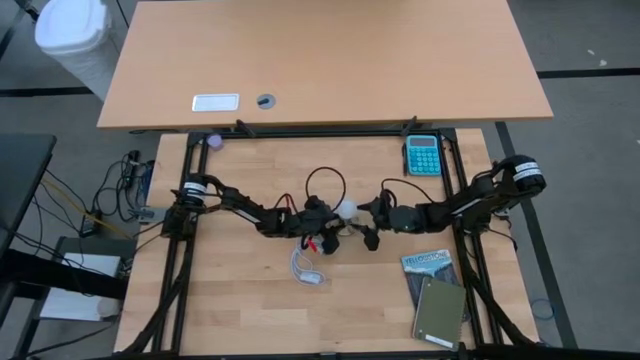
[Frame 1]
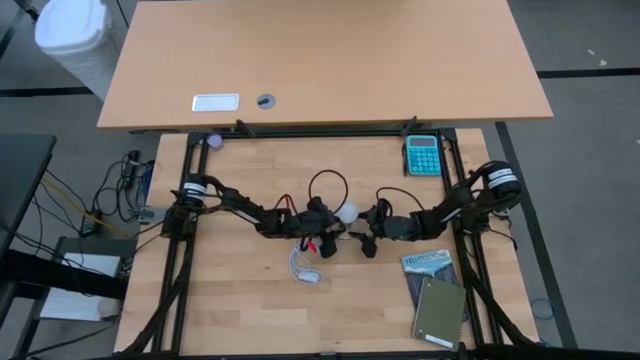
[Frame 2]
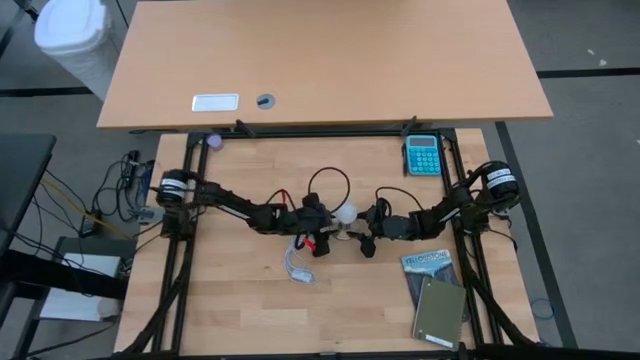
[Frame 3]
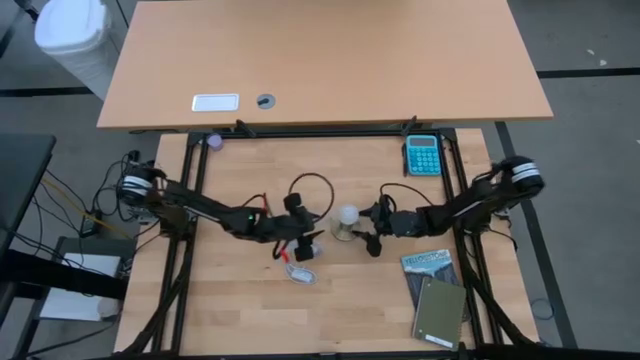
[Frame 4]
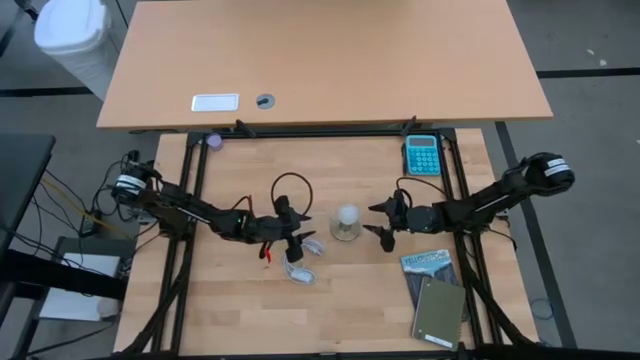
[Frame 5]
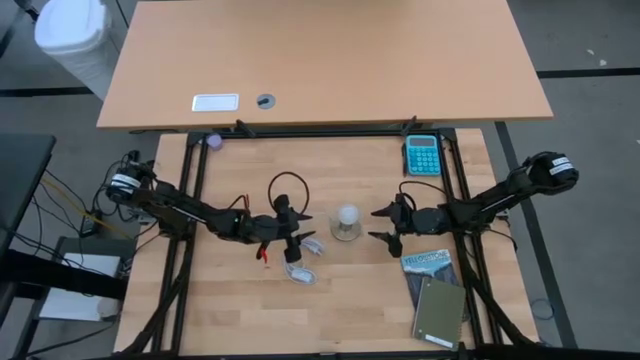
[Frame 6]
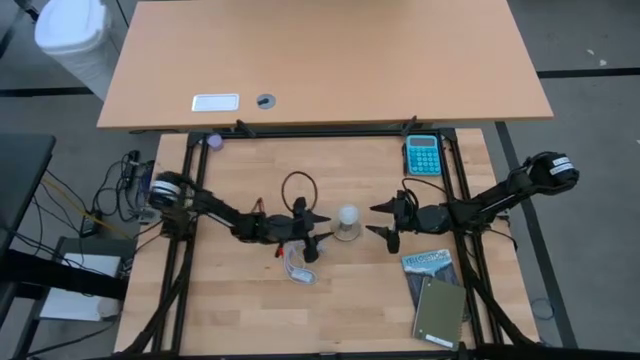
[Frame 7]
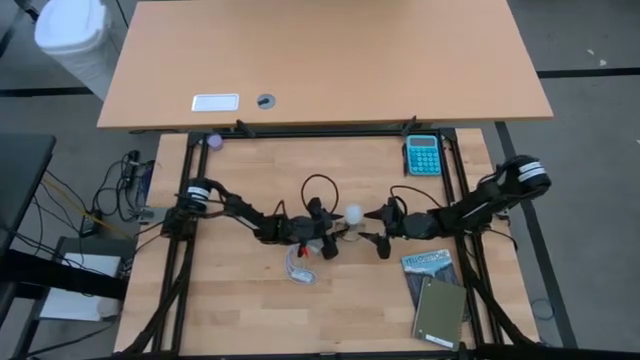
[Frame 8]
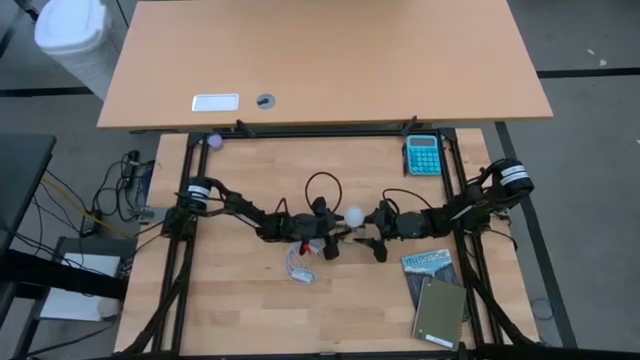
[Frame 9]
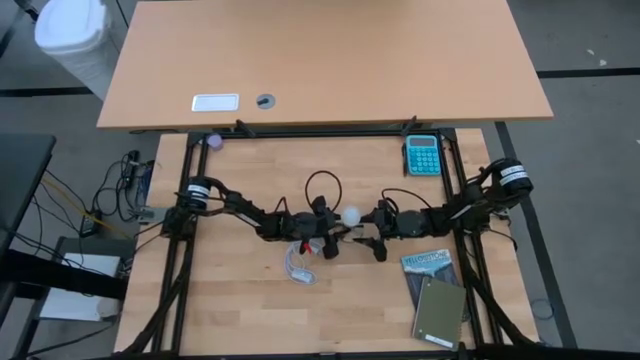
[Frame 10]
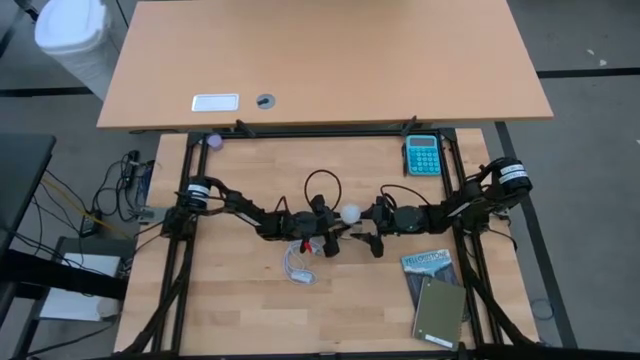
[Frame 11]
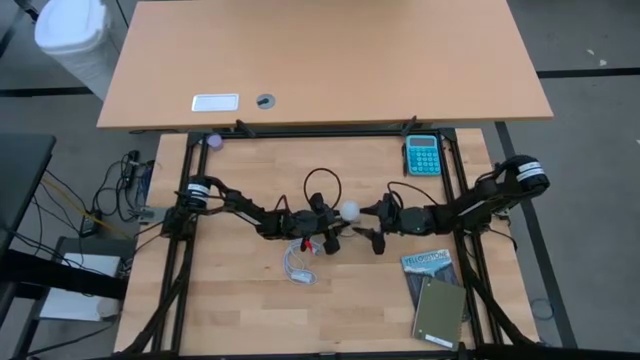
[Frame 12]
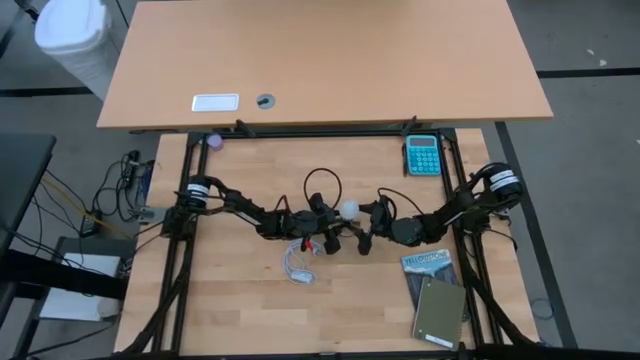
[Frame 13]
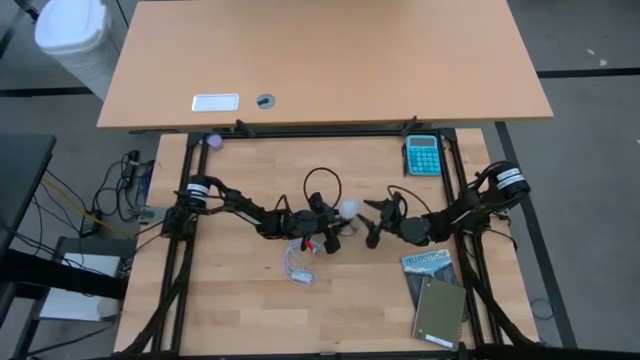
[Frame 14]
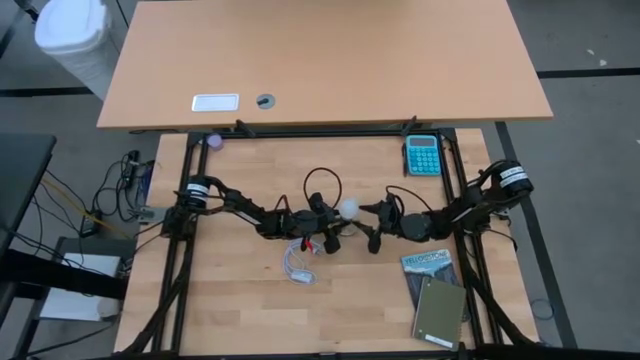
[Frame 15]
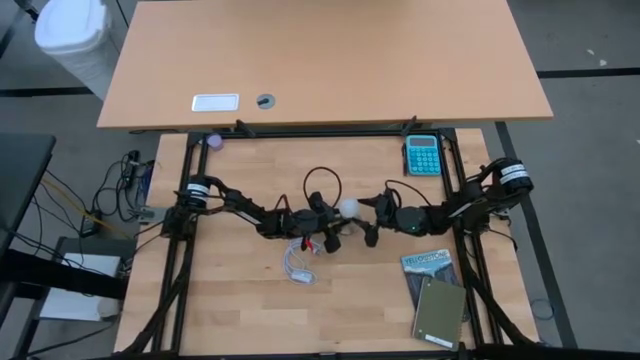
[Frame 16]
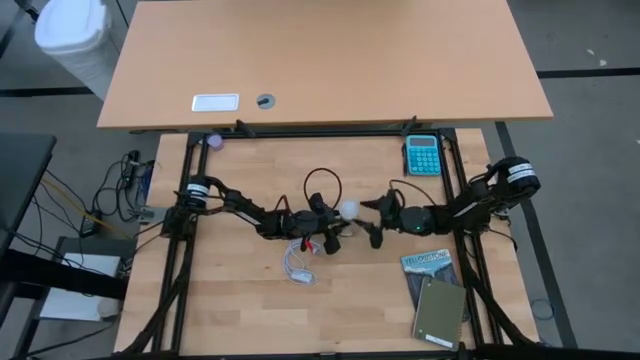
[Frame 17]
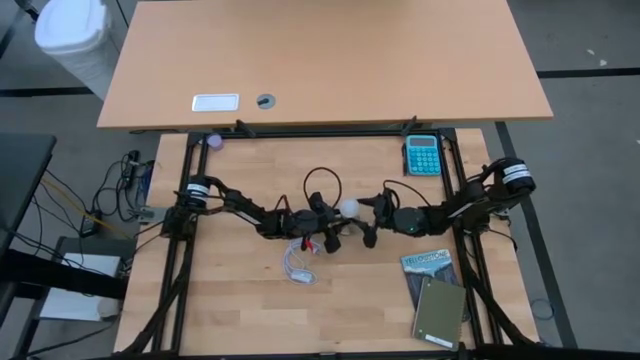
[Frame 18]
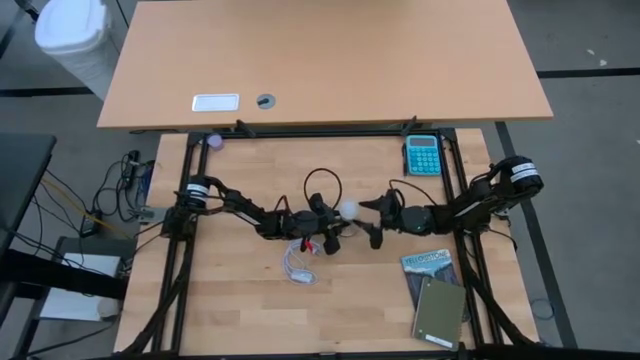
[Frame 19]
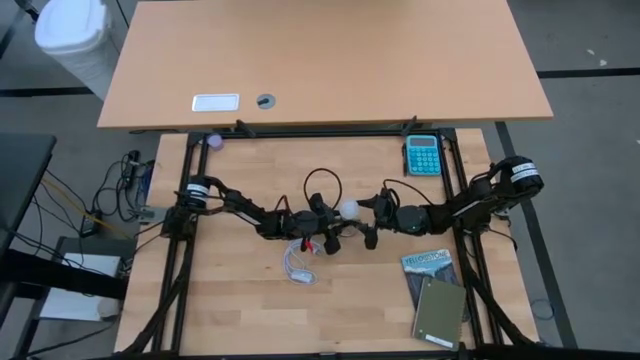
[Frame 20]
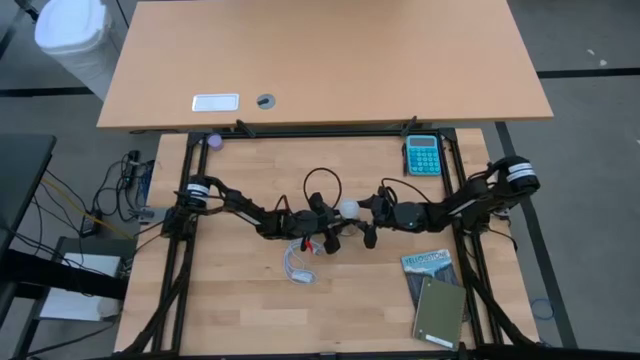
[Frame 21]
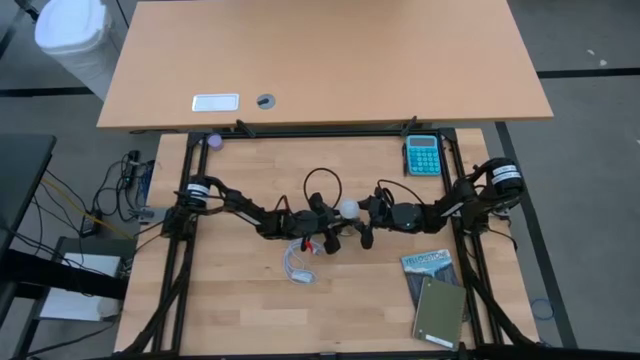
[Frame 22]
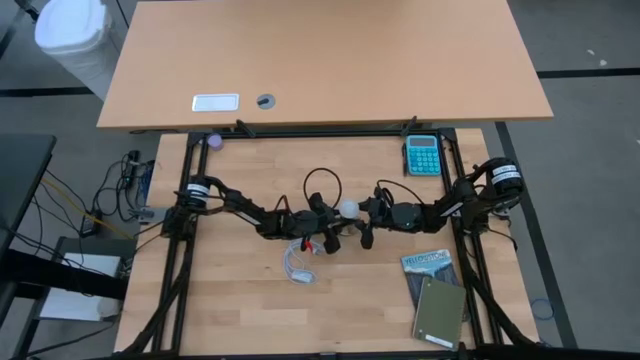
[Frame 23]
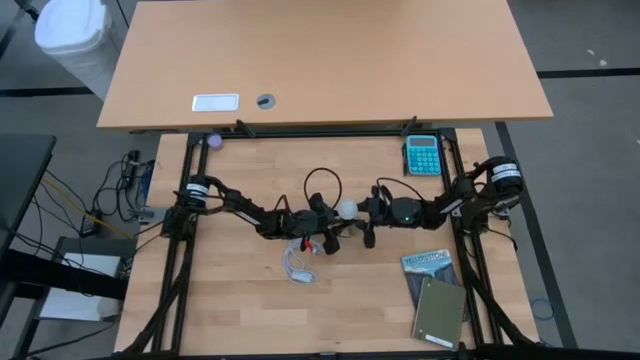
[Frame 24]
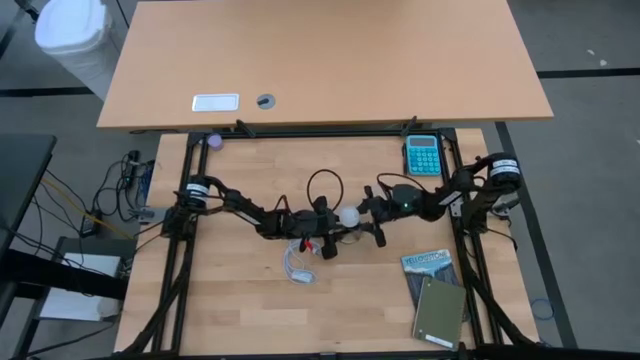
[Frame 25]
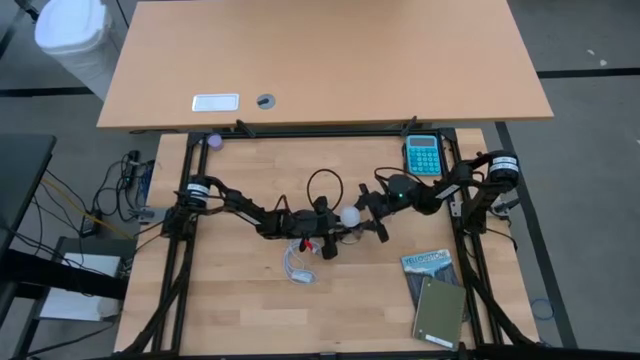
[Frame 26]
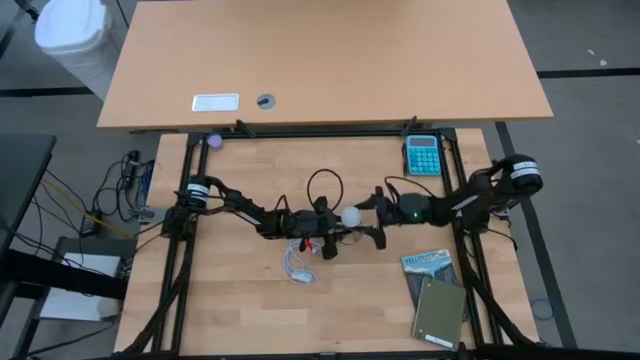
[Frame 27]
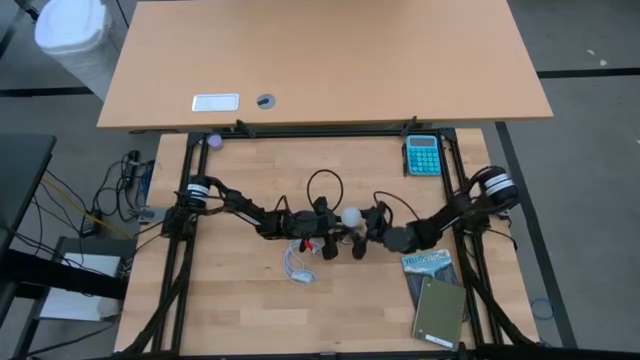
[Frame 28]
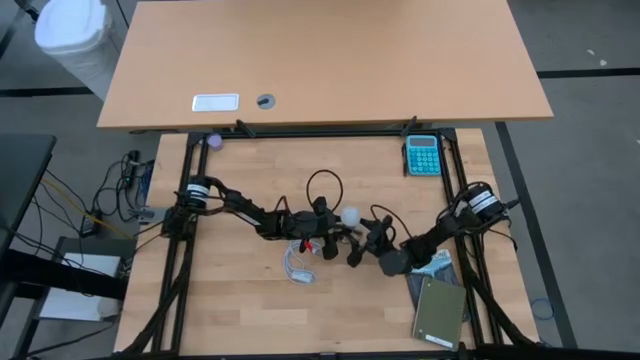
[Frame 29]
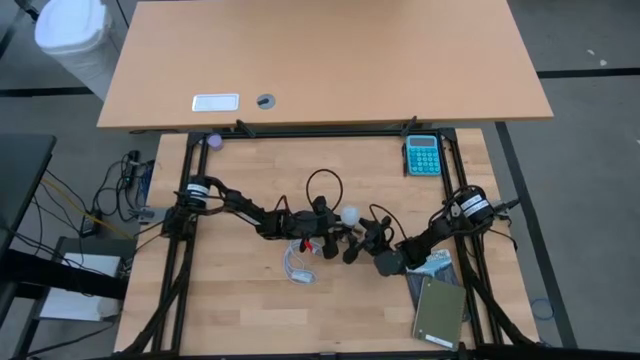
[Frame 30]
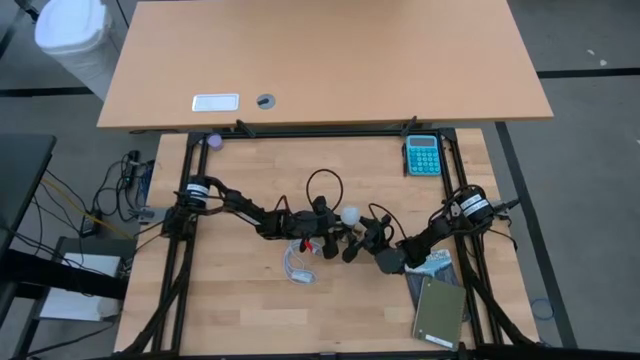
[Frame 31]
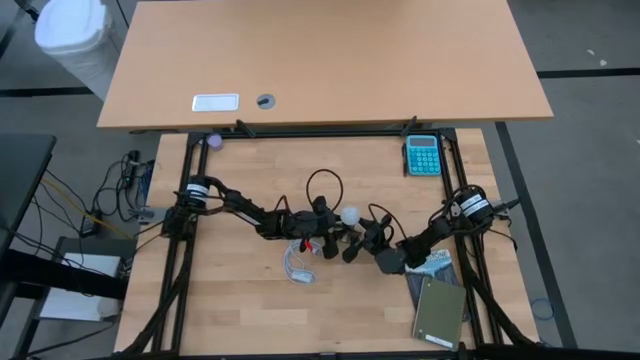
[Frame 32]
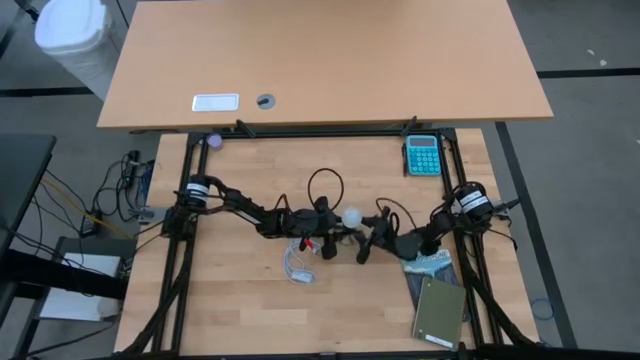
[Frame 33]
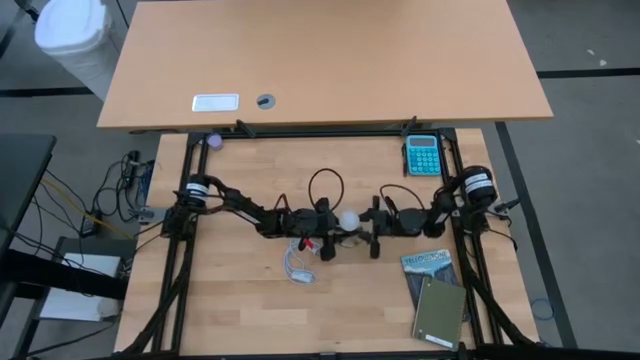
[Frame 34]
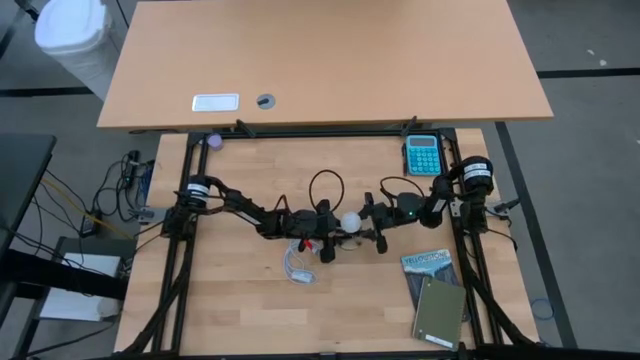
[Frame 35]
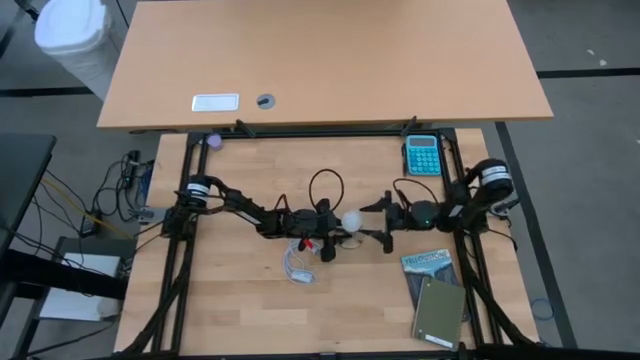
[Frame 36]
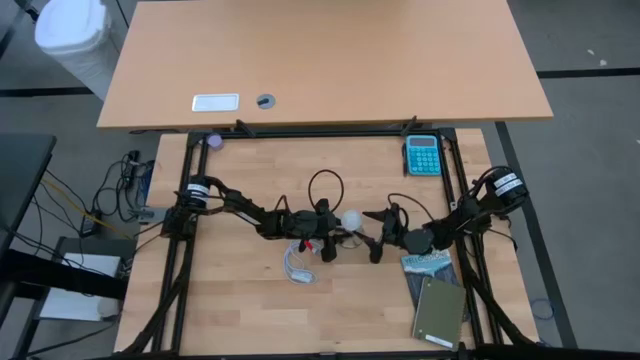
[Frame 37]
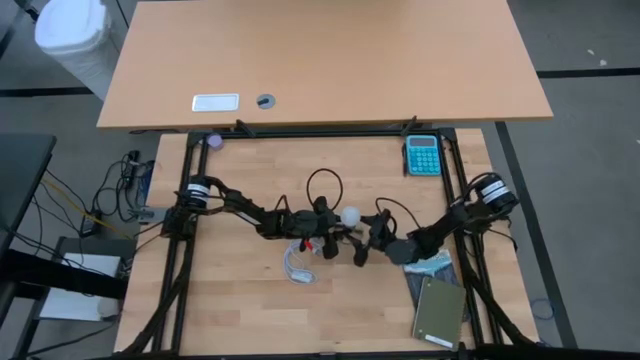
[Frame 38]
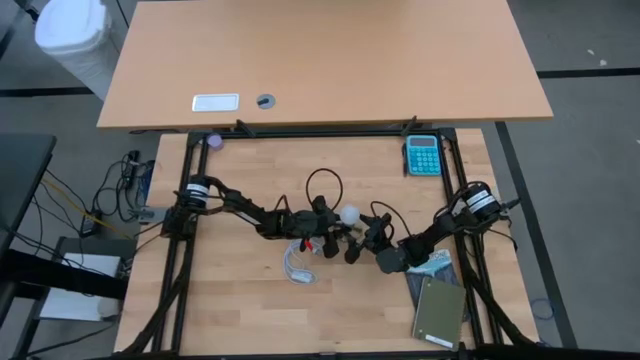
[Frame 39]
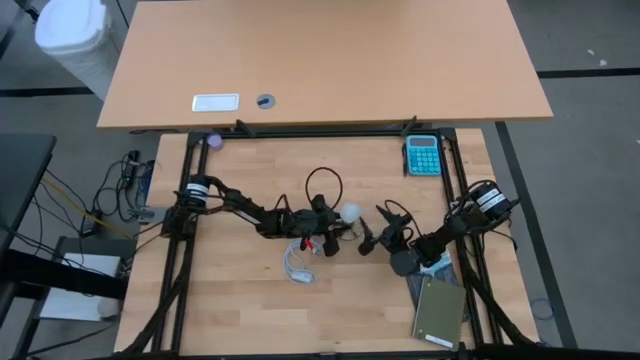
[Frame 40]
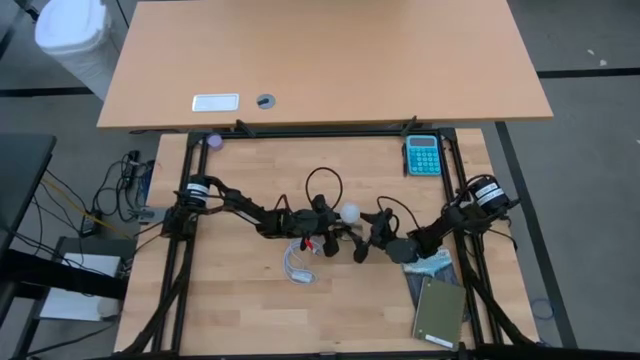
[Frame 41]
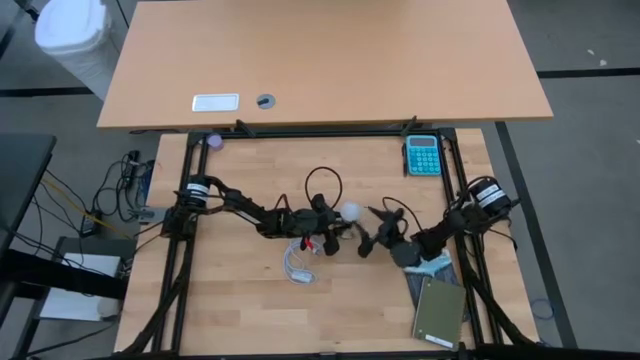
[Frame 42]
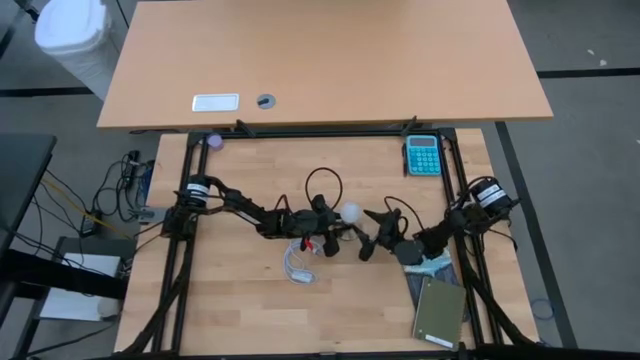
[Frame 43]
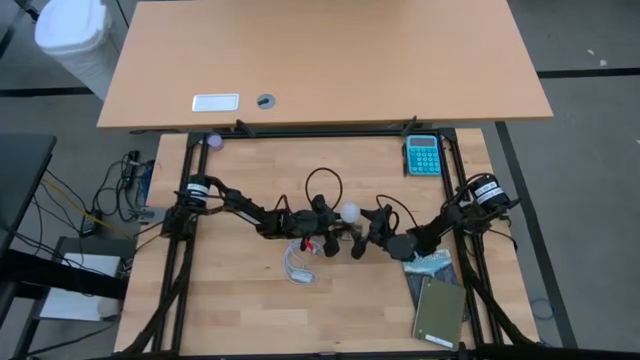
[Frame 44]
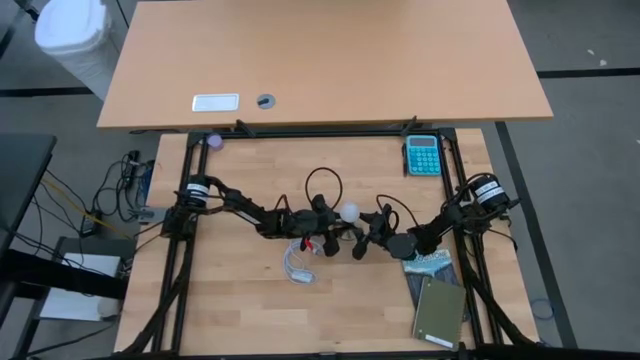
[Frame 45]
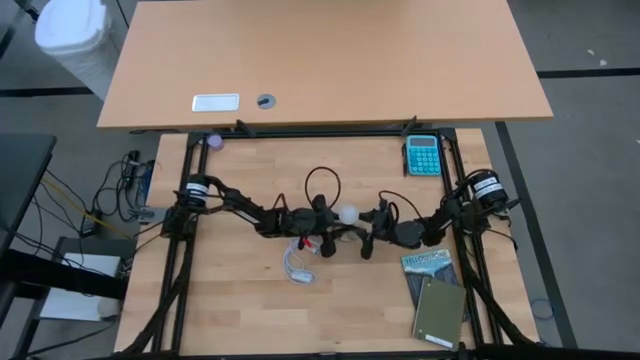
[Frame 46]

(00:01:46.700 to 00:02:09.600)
Task: Screw lightbulb
Remove the lightbulb from the desk lamp
